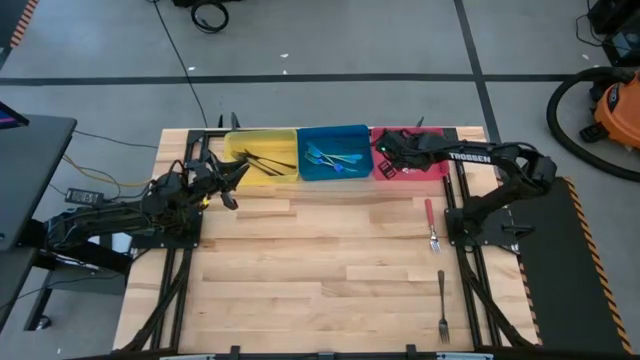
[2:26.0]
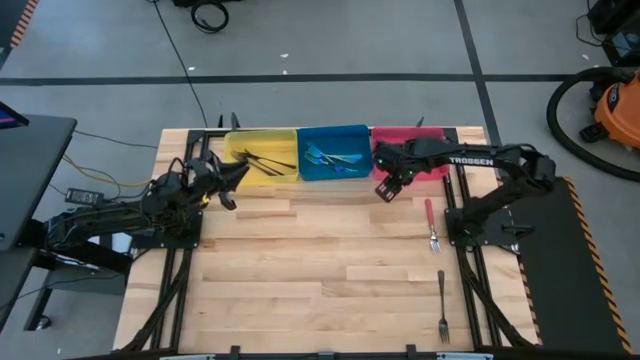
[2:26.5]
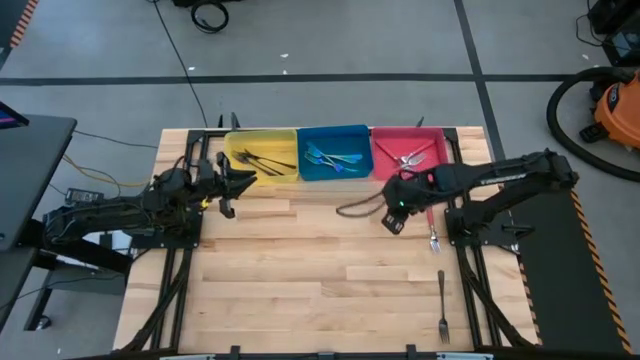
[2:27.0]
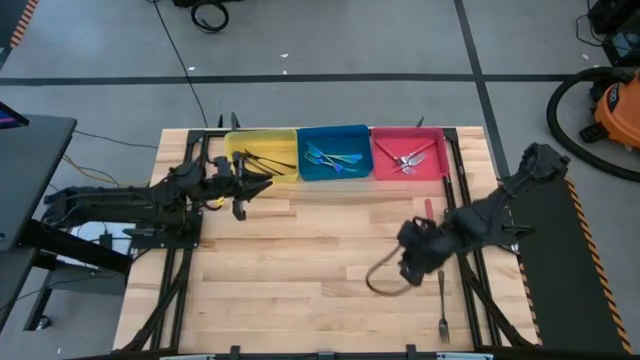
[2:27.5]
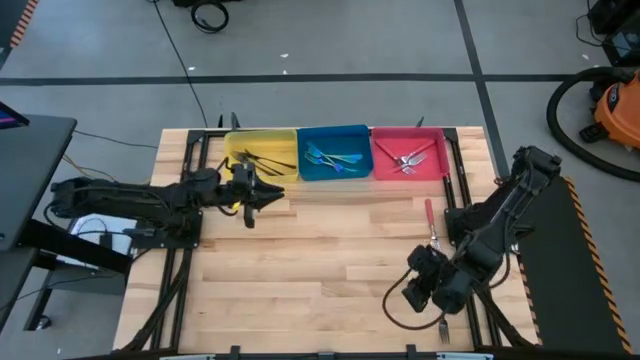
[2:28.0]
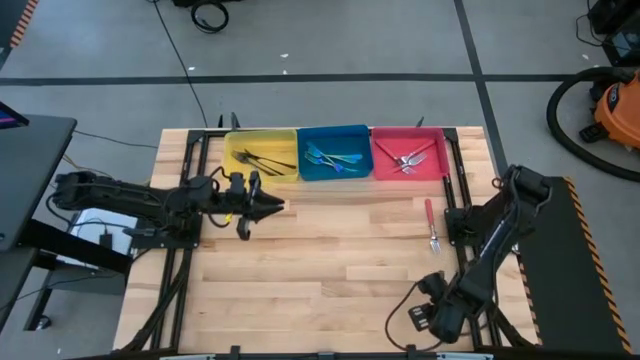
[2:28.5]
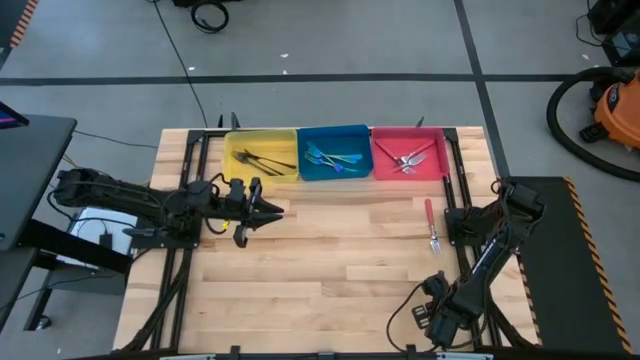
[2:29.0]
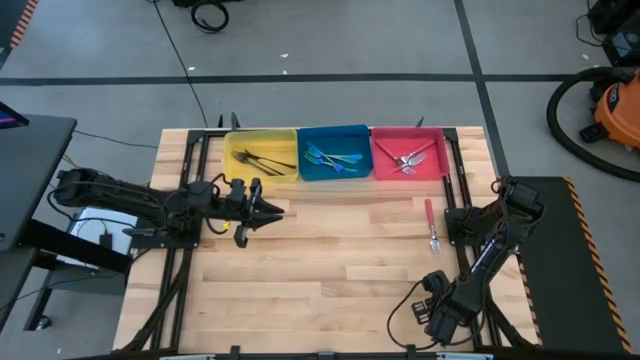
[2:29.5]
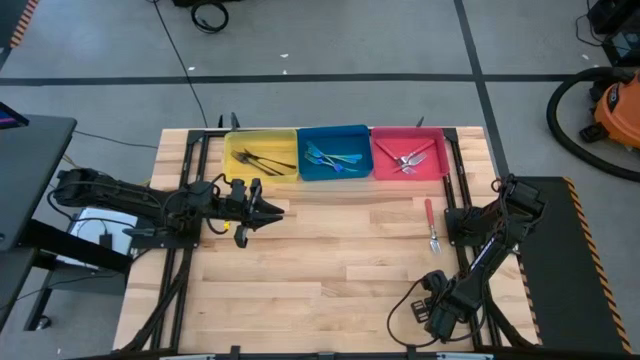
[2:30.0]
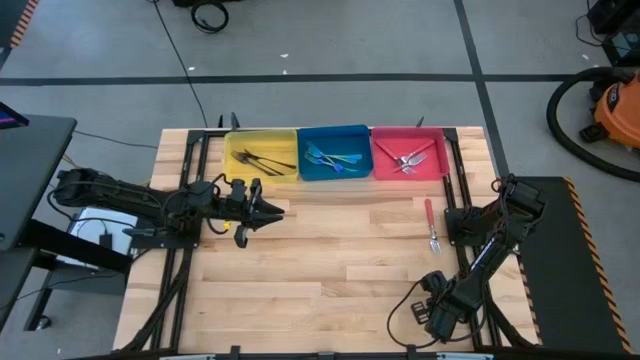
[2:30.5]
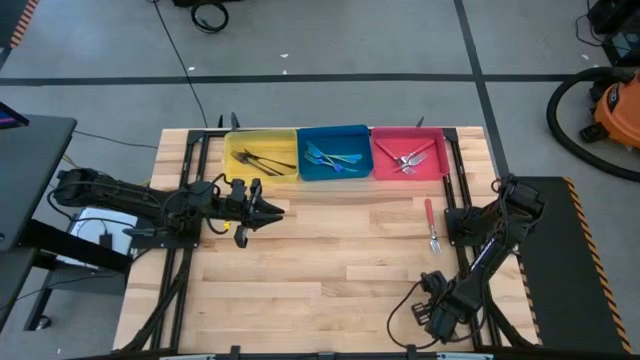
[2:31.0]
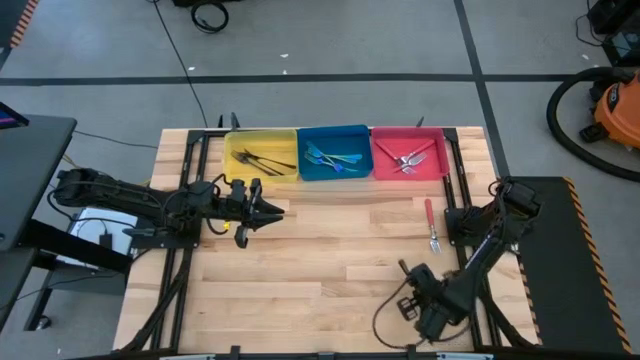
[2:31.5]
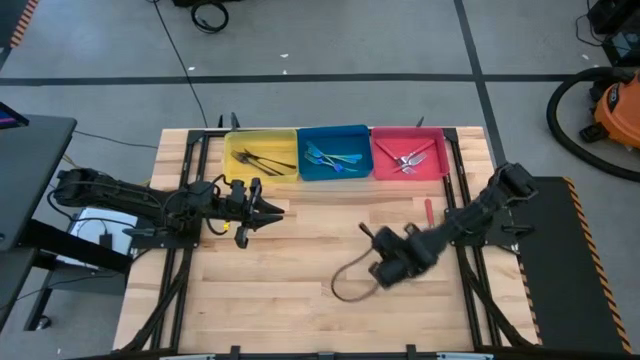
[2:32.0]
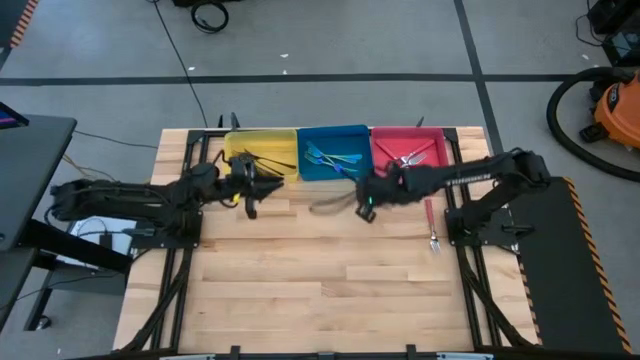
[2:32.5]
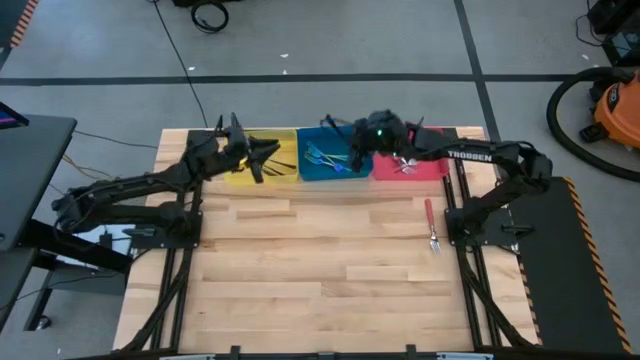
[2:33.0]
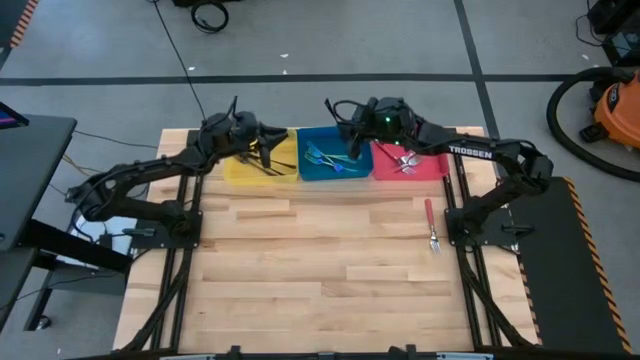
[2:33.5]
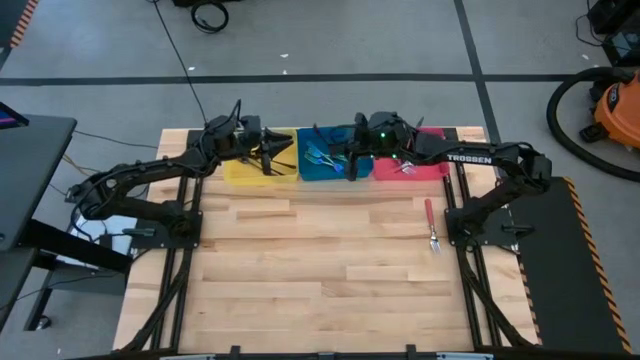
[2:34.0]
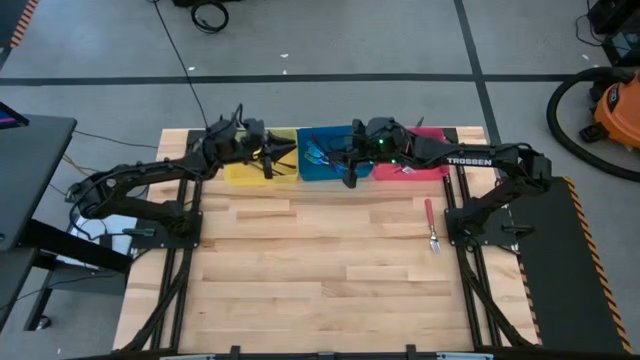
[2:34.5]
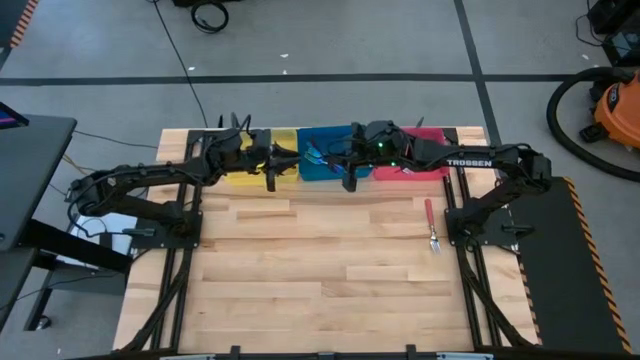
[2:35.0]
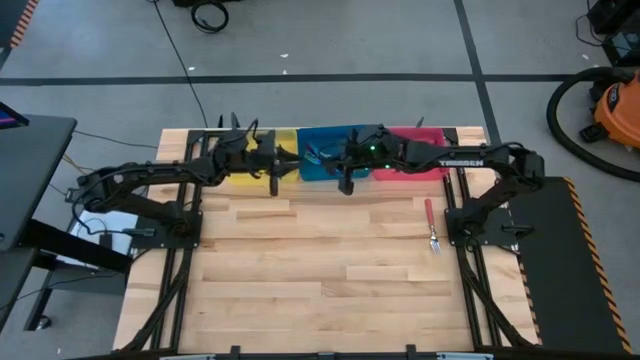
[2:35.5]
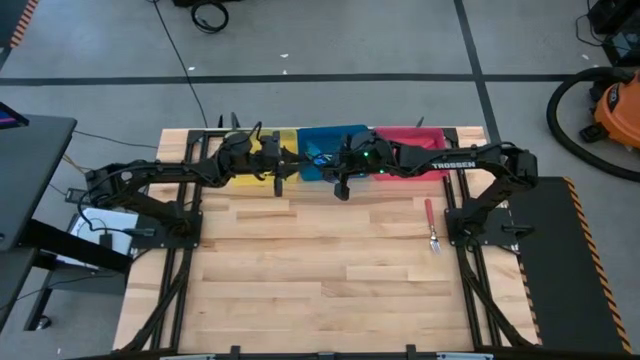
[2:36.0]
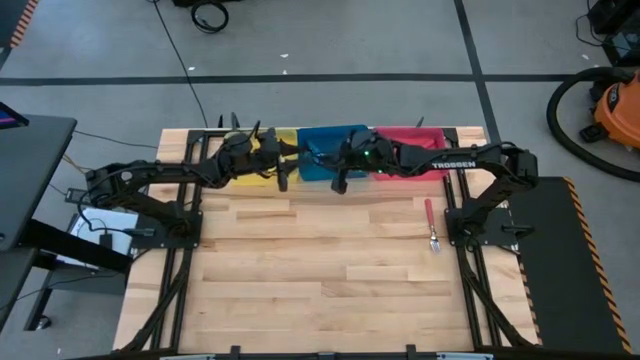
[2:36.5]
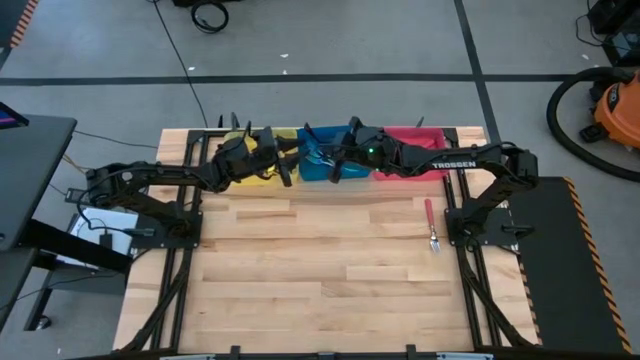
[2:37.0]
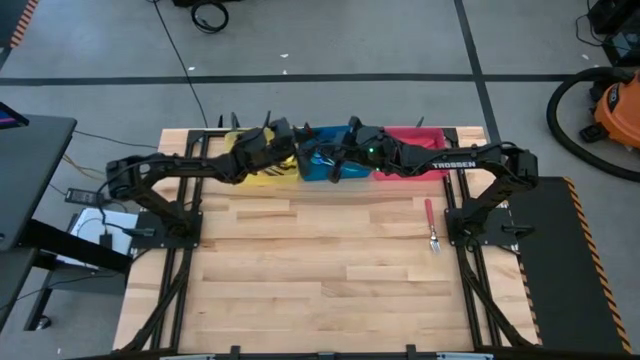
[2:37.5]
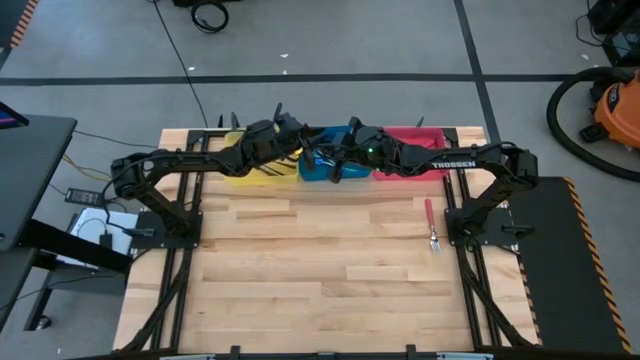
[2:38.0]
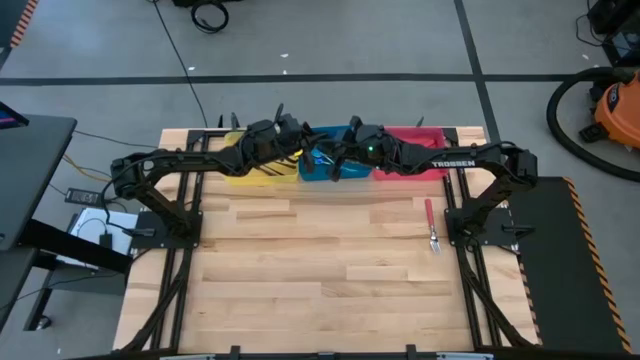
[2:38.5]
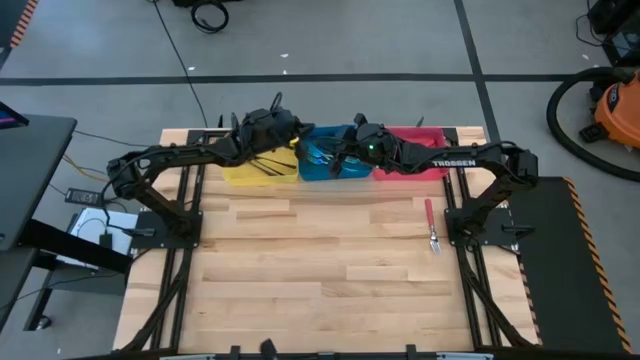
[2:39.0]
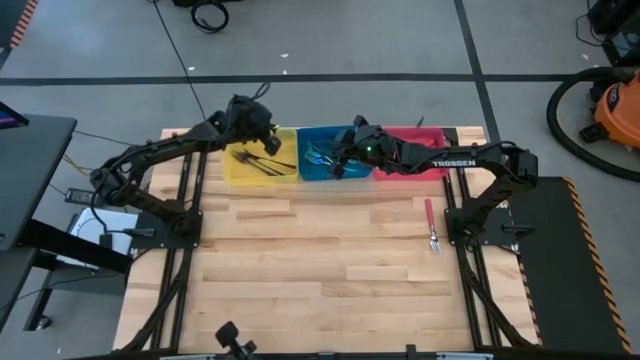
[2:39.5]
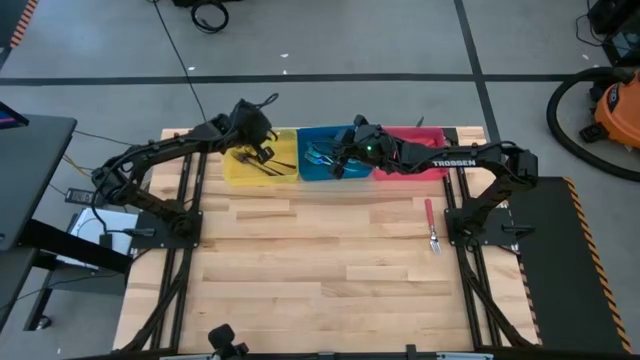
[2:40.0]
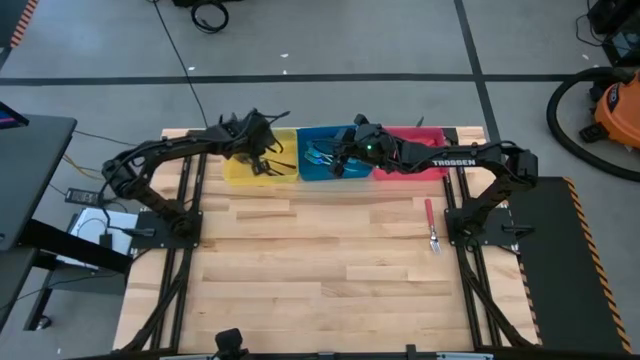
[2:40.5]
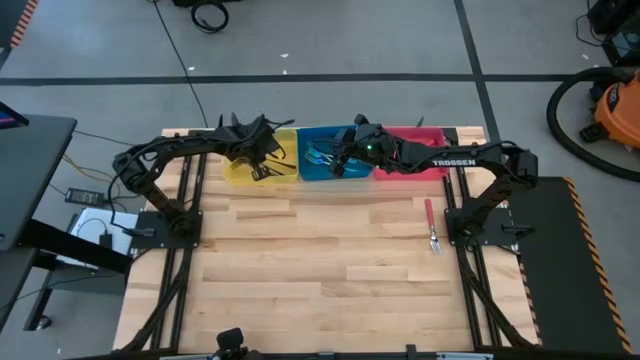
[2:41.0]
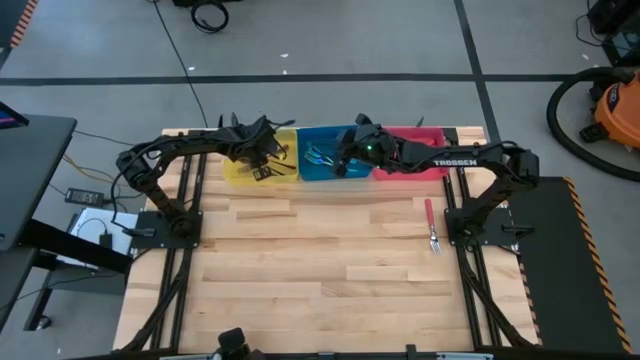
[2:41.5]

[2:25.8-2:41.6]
Task: Sort silverware by color (type)
Put the black fork into the yellow bin

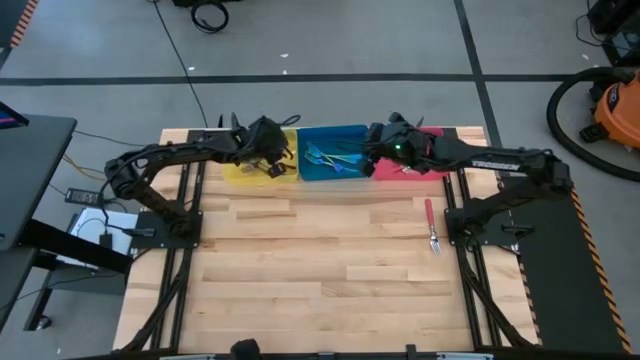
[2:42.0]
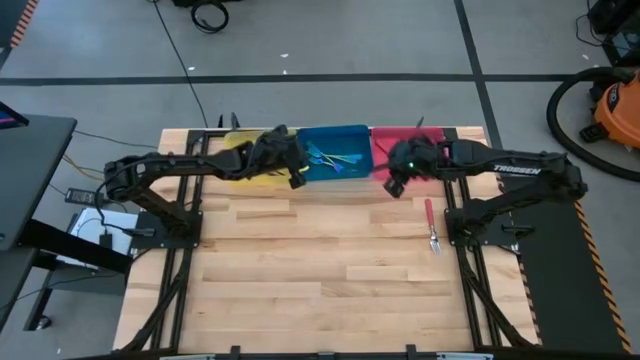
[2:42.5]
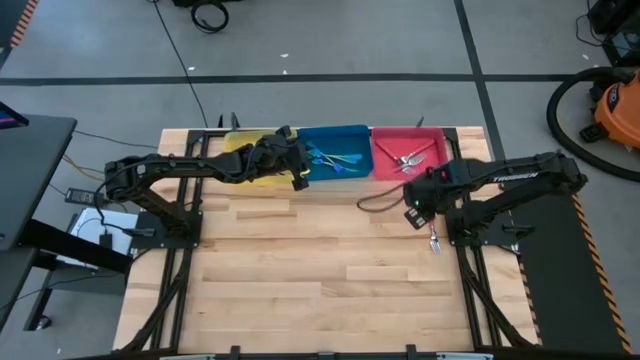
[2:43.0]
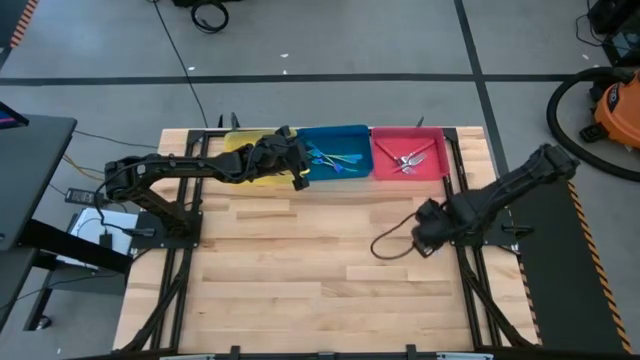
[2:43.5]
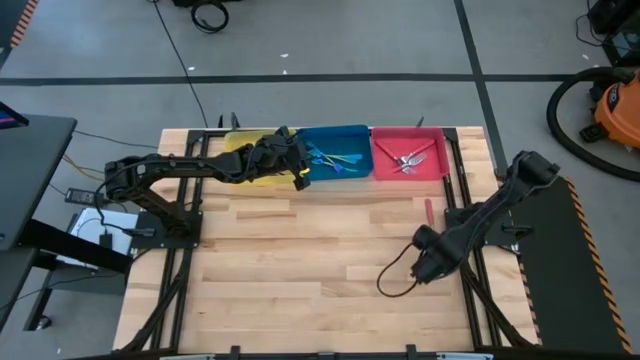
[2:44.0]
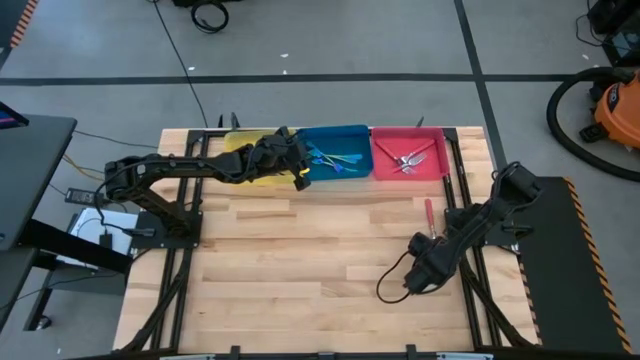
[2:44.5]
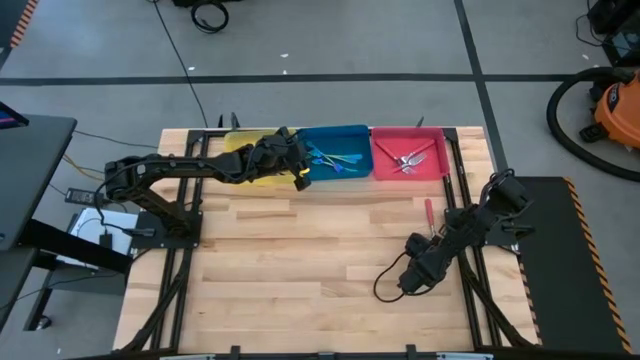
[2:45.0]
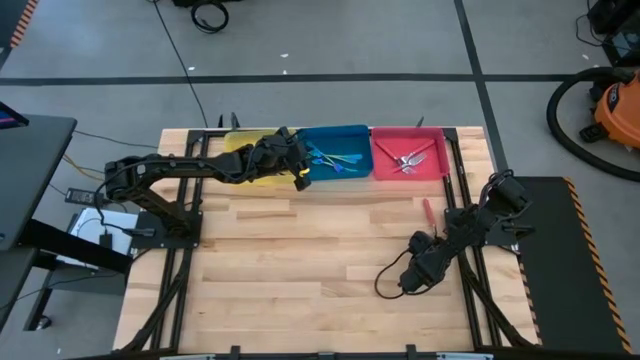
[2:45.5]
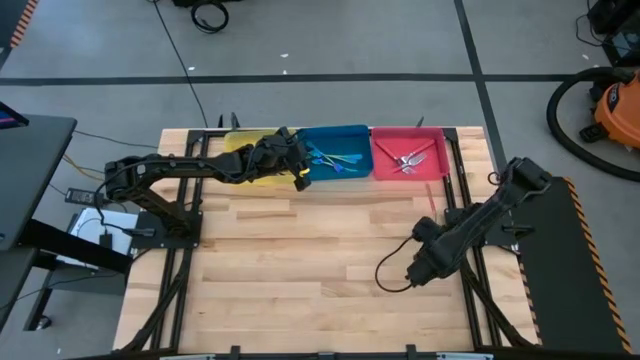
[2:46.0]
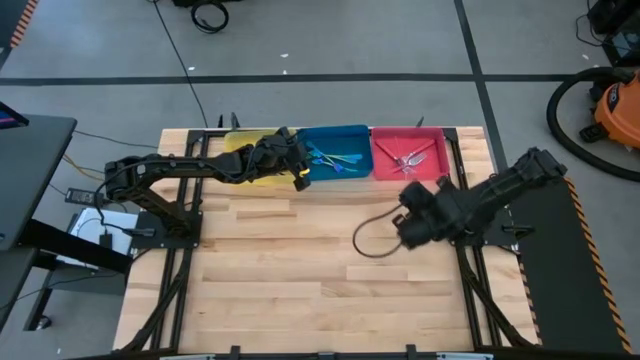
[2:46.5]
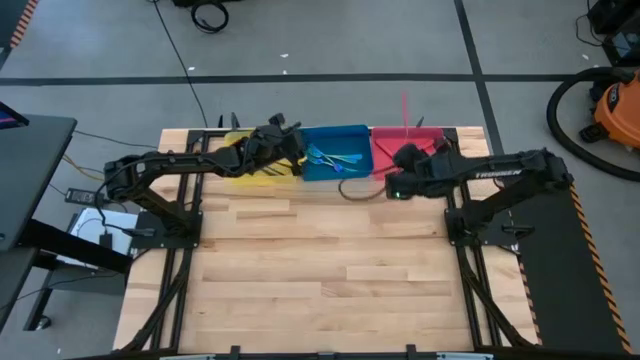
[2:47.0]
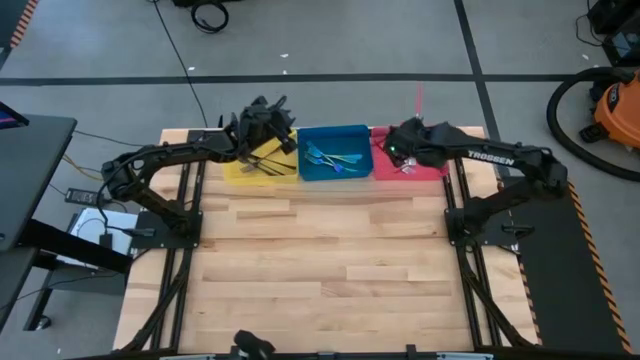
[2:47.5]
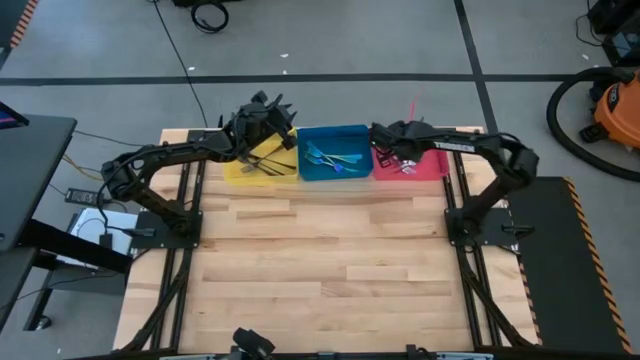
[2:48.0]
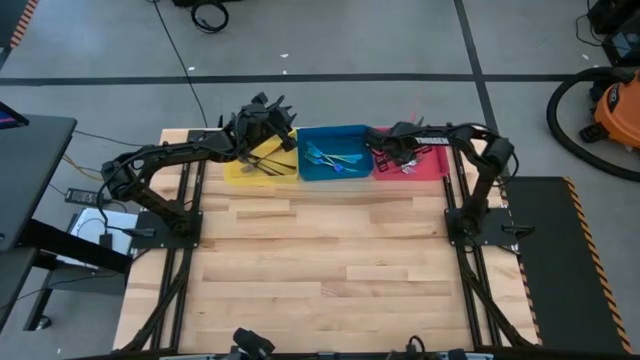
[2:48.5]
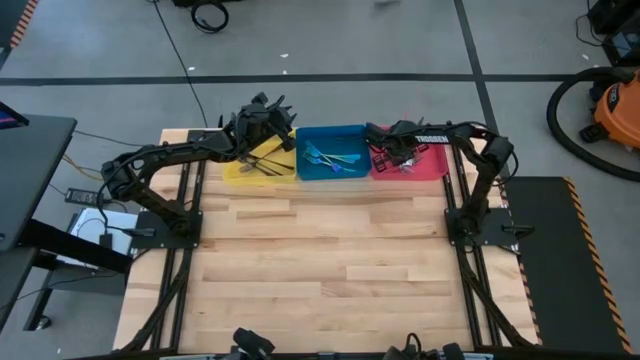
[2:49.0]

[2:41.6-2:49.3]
Put the pink fork into the red bin
